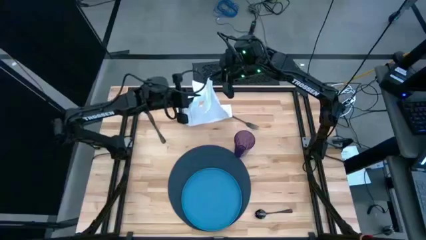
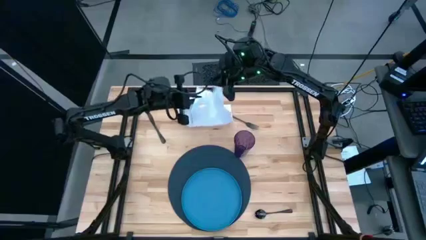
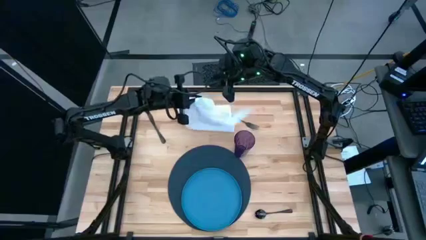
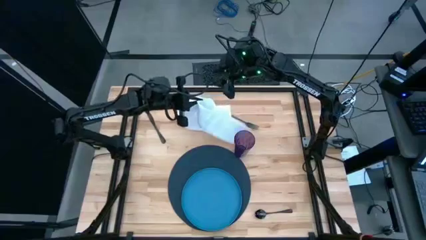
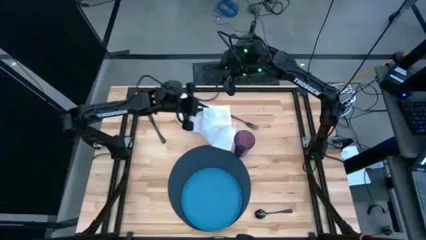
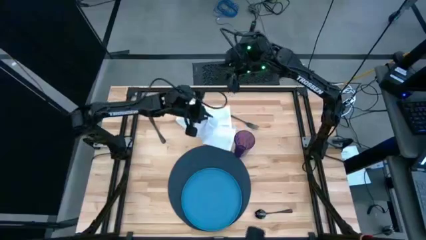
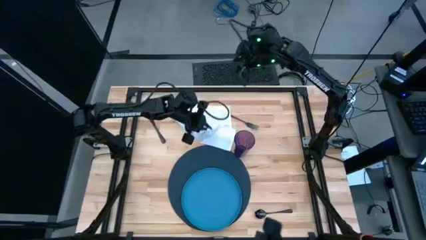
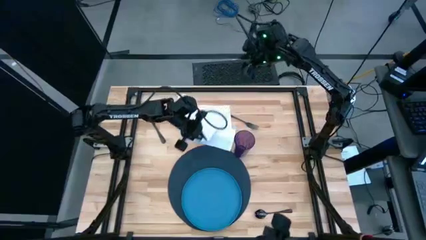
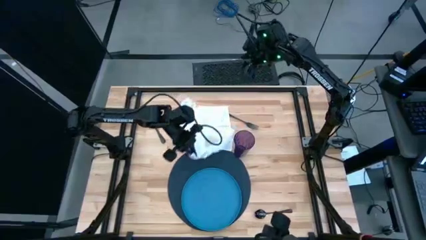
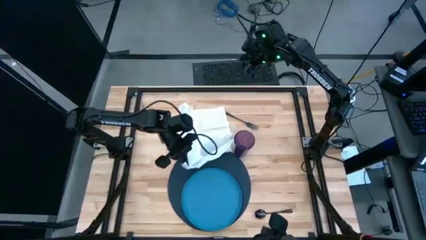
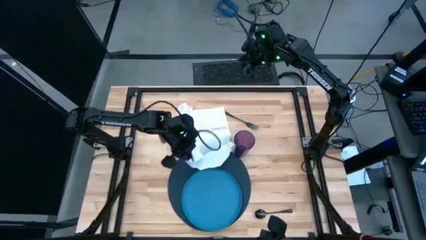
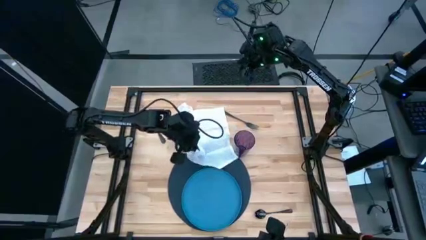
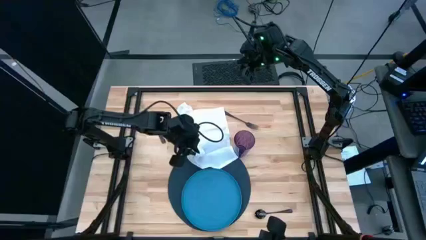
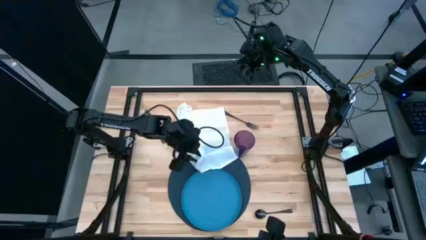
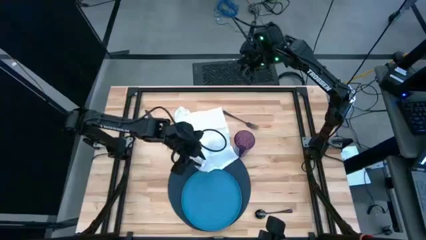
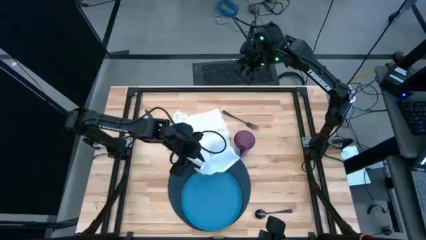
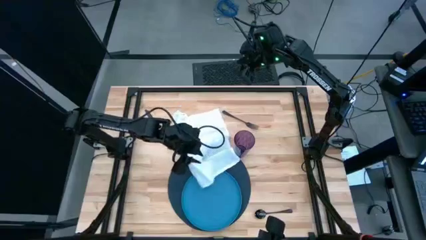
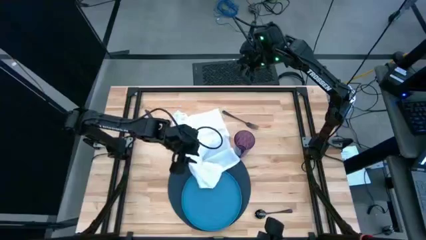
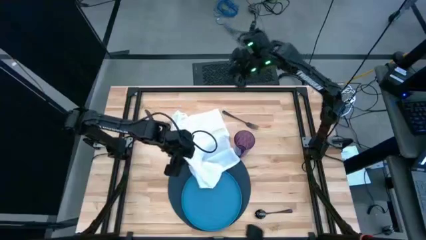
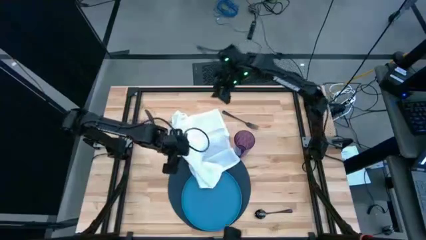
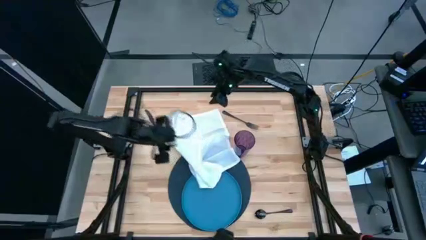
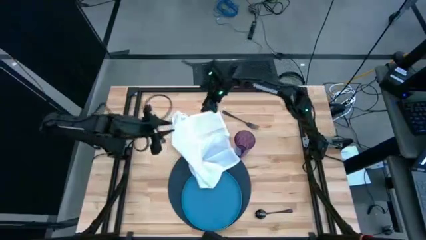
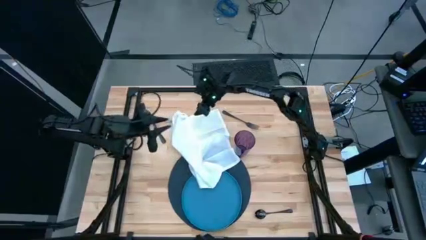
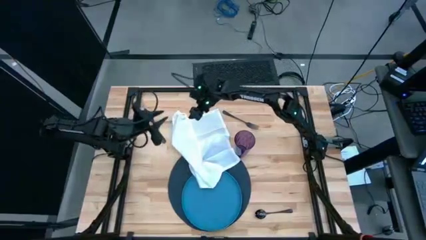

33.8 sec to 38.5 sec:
Task: Set table place
Fold the white napkin

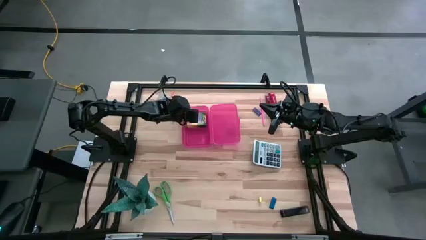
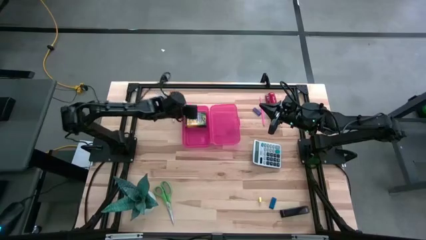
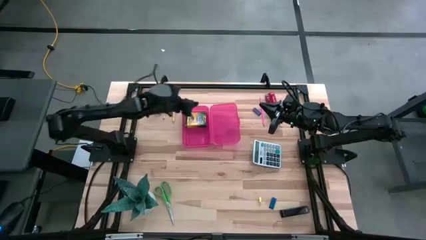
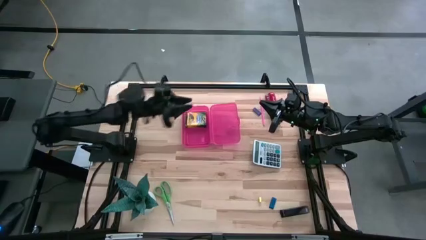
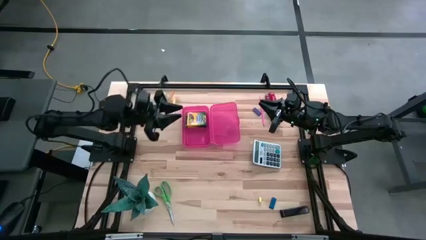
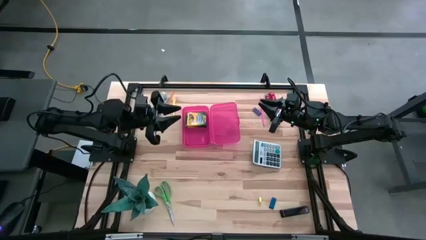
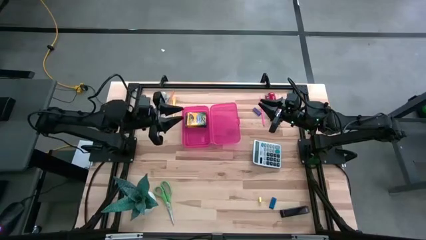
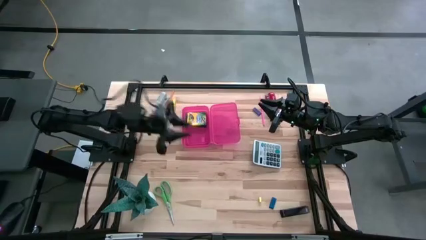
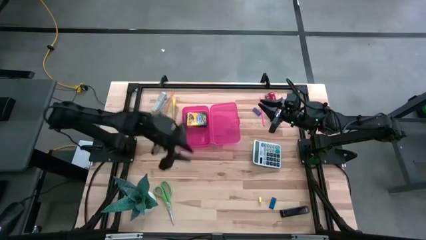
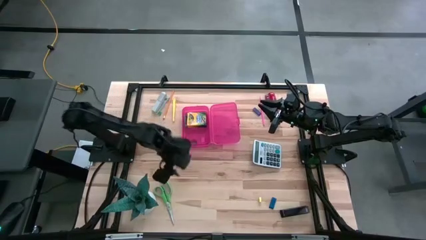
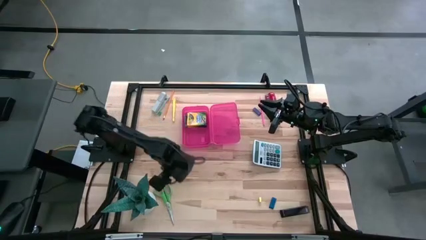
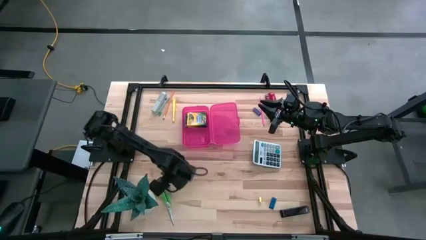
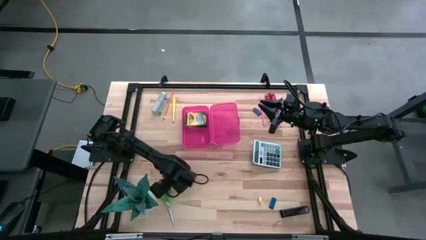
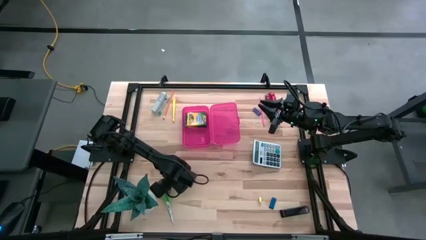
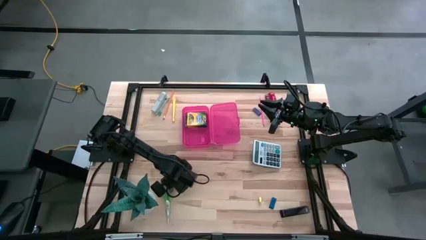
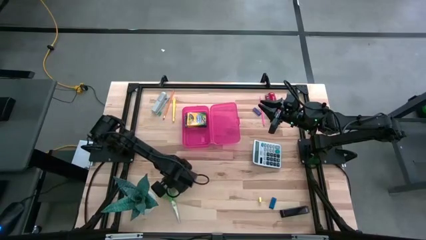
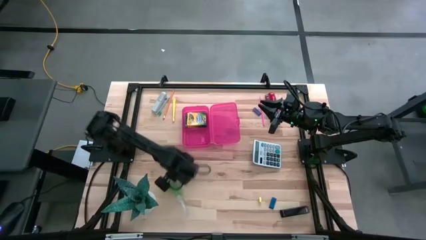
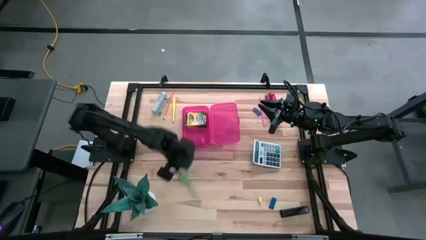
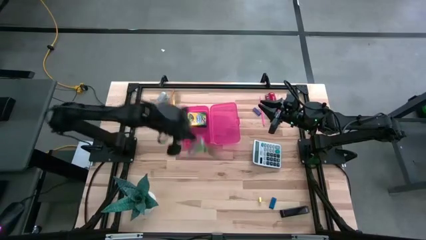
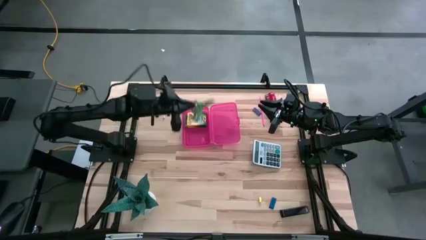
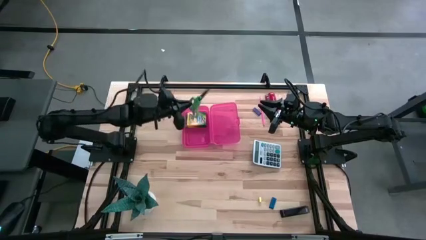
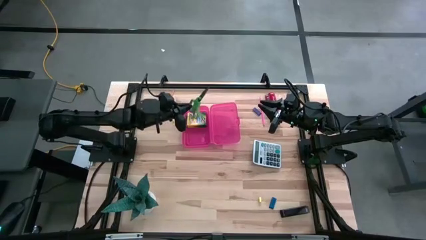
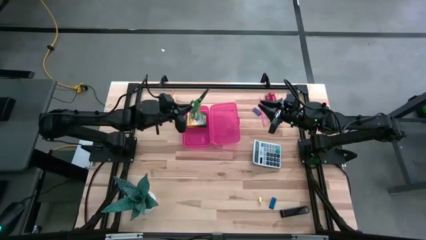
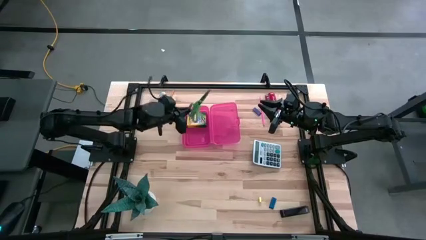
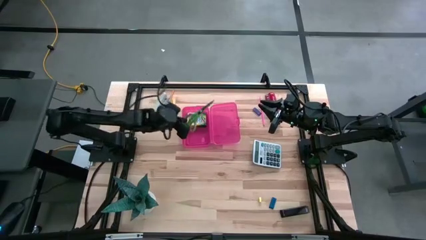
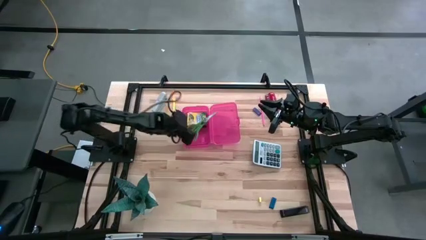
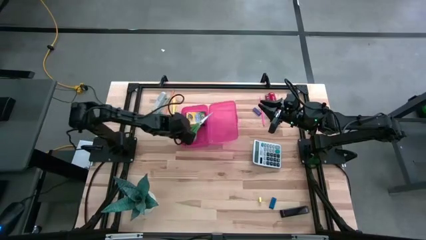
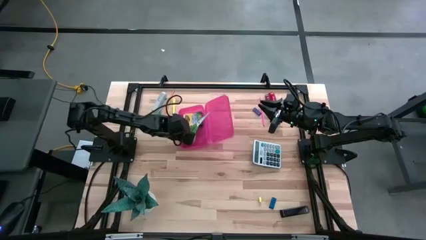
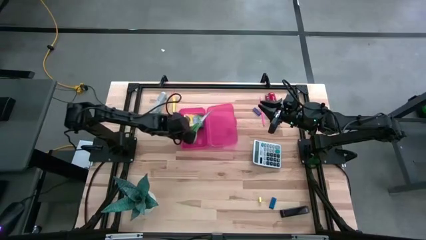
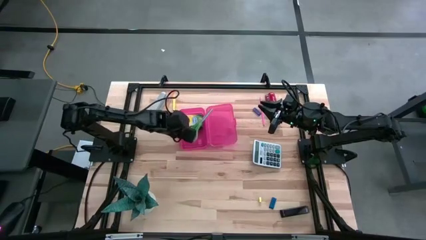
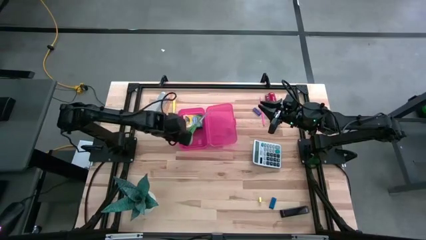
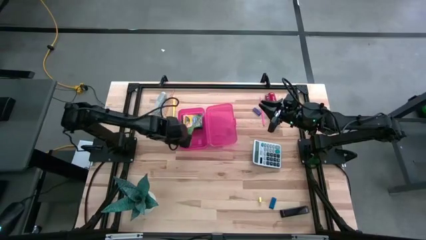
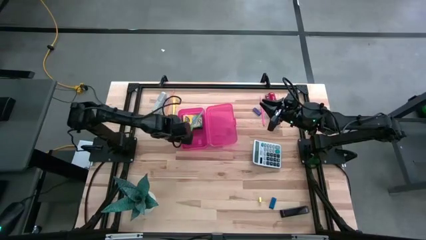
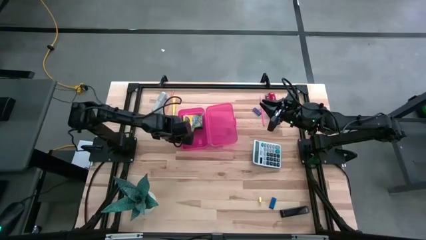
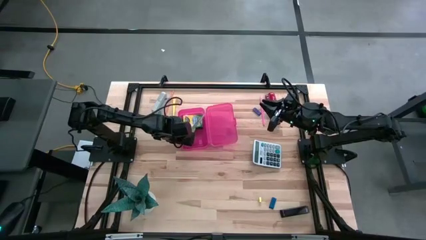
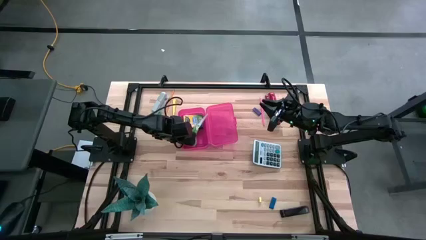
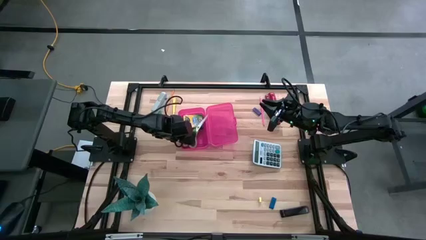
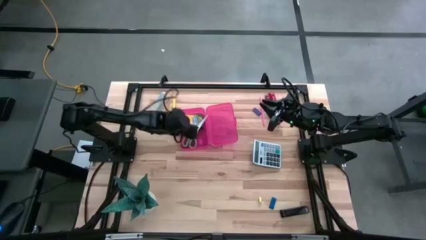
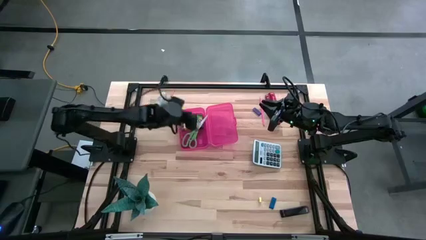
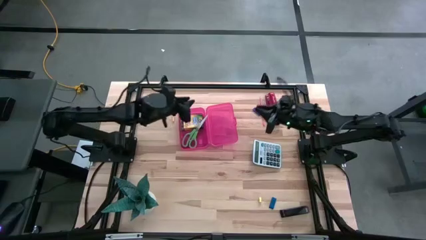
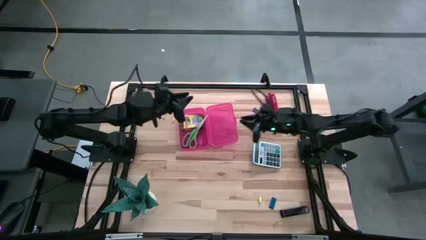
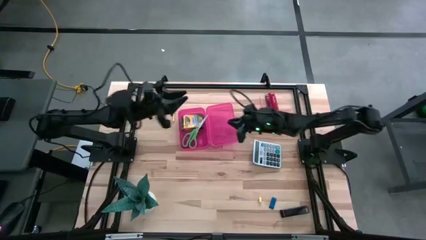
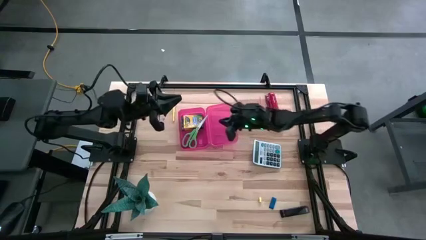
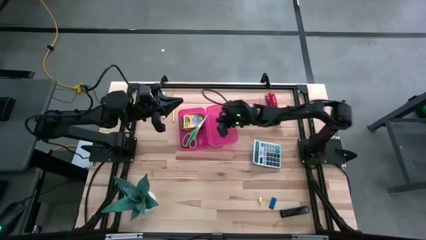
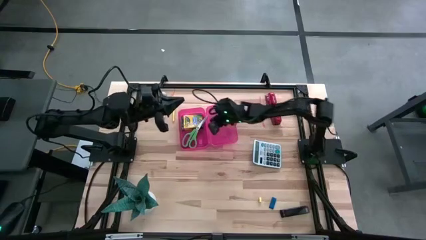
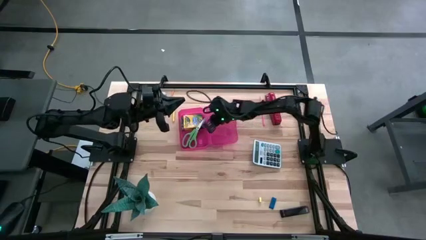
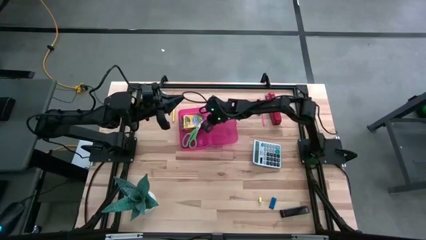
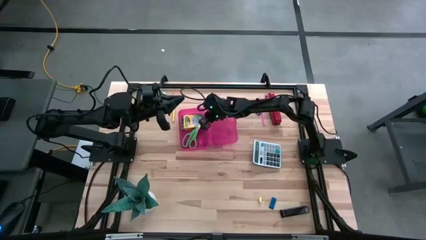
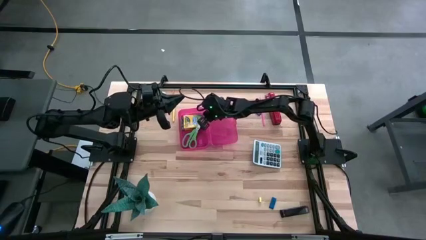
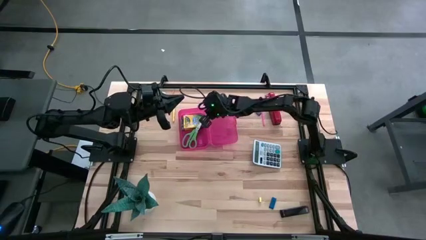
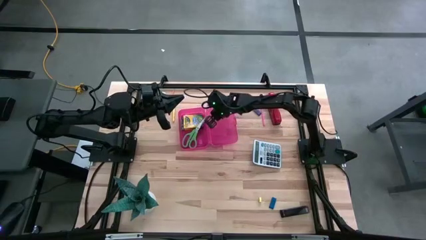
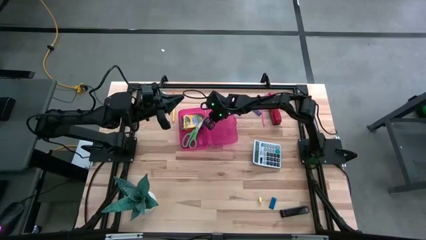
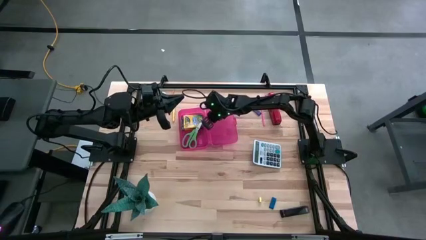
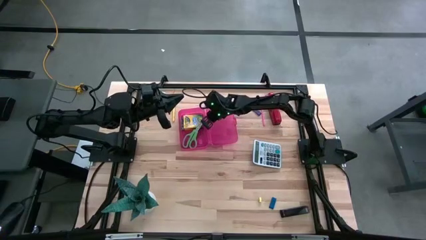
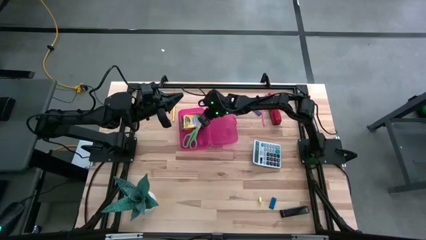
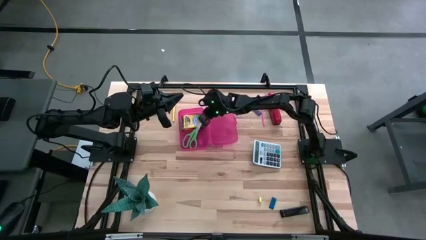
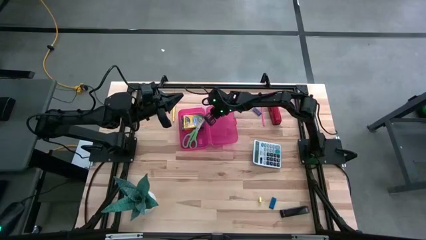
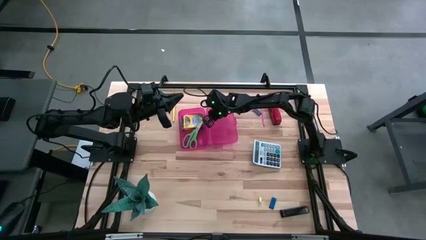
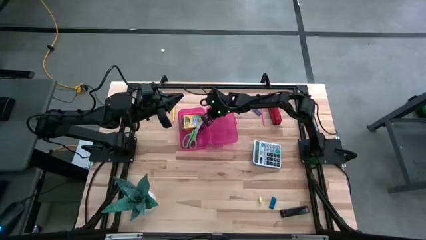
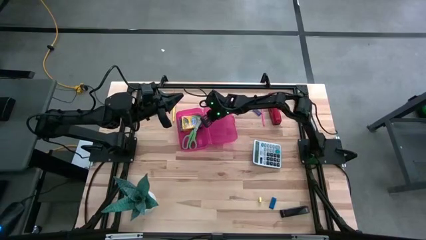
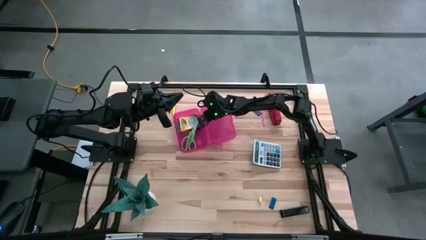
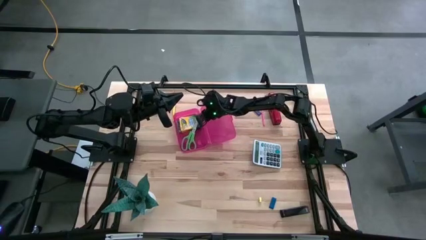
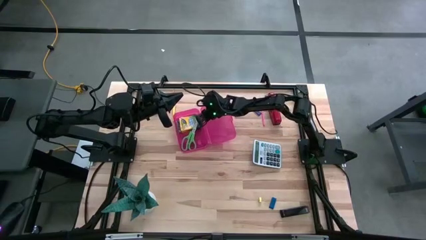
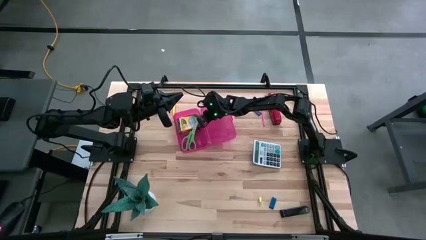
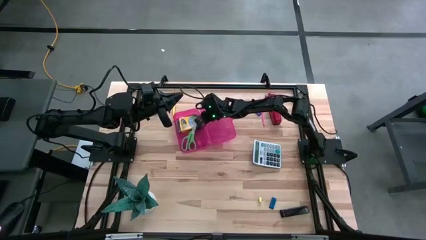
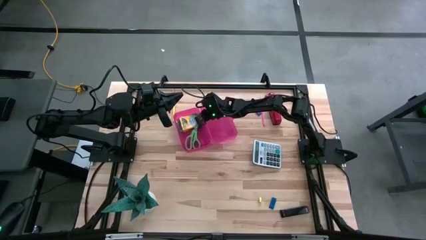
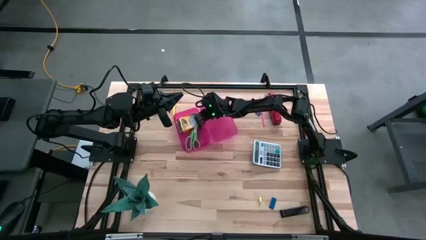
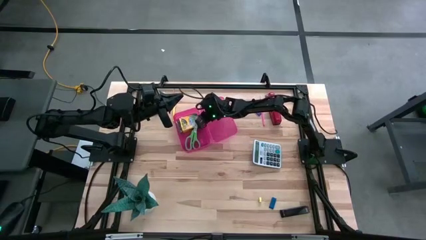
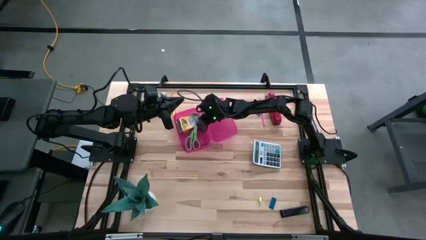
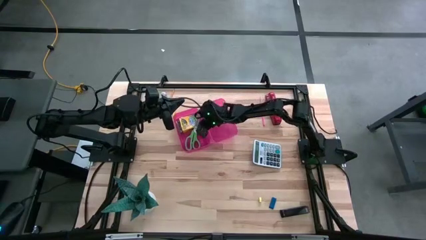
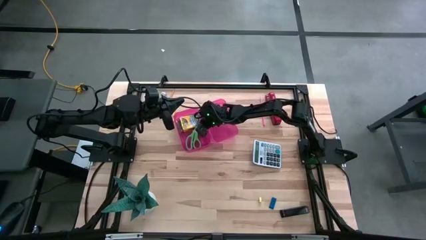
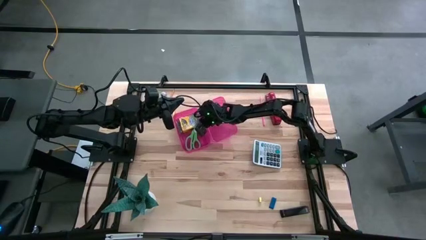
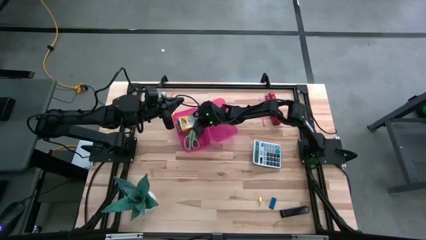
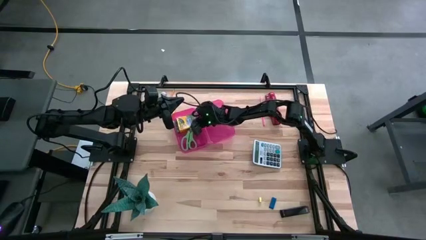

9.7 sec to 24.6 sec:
Task: Pack school essentials
Put the green scissors into the pink pencil box
